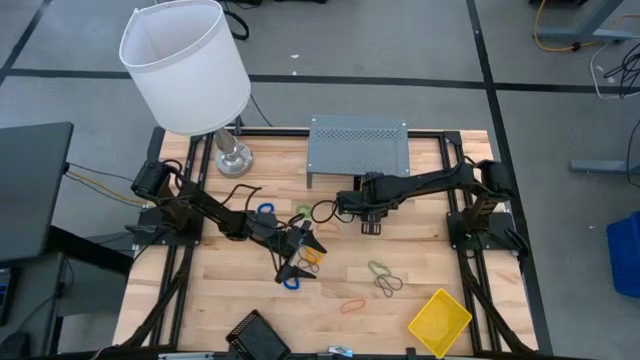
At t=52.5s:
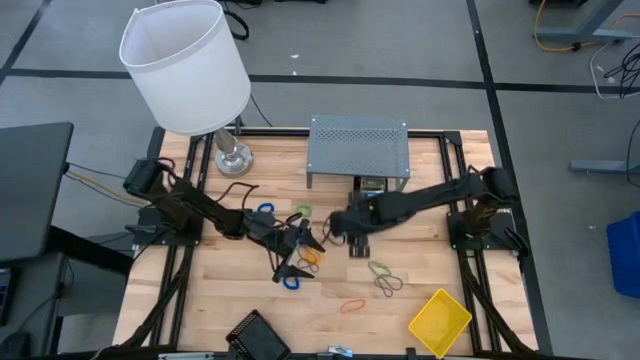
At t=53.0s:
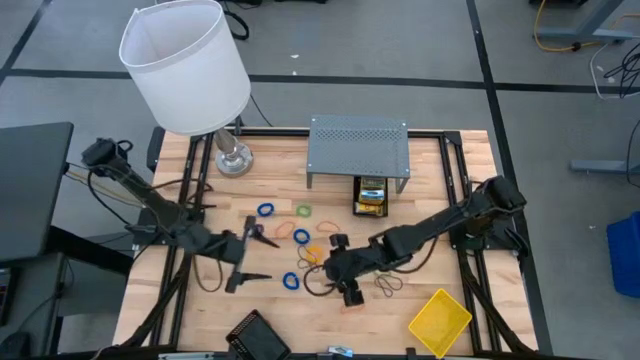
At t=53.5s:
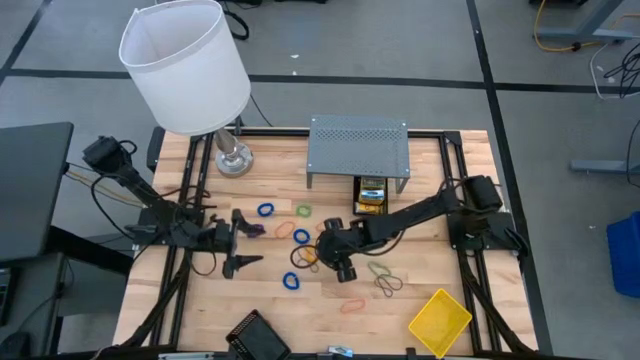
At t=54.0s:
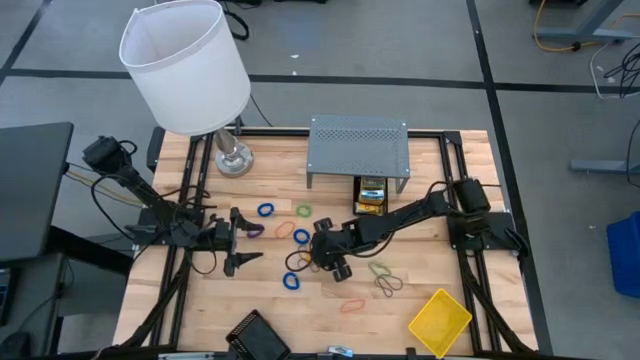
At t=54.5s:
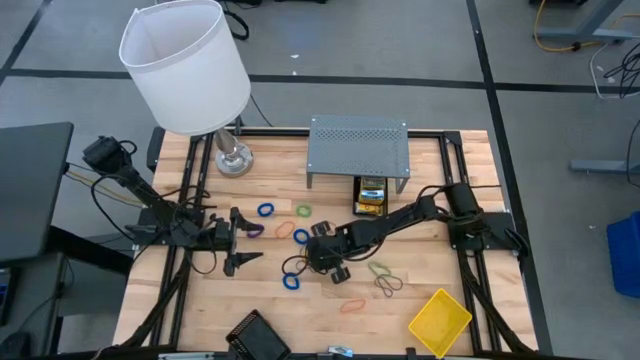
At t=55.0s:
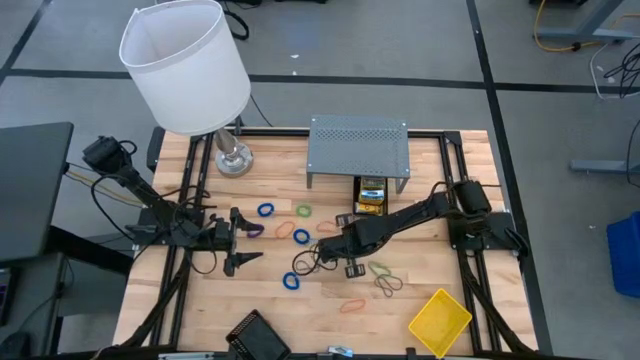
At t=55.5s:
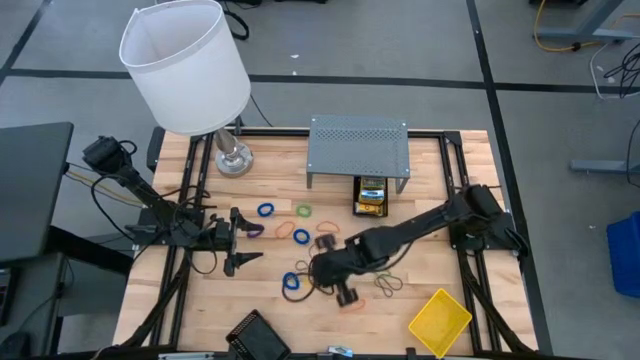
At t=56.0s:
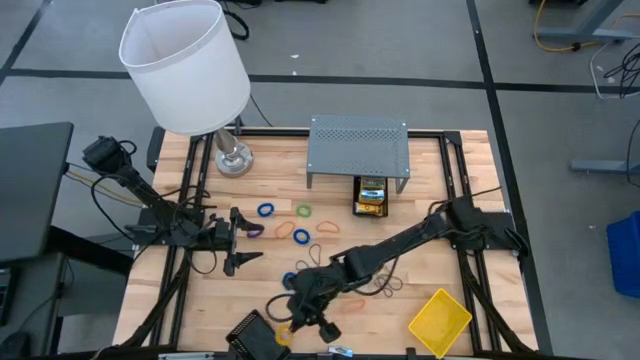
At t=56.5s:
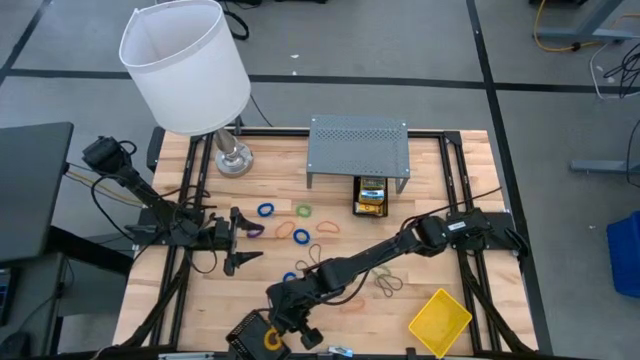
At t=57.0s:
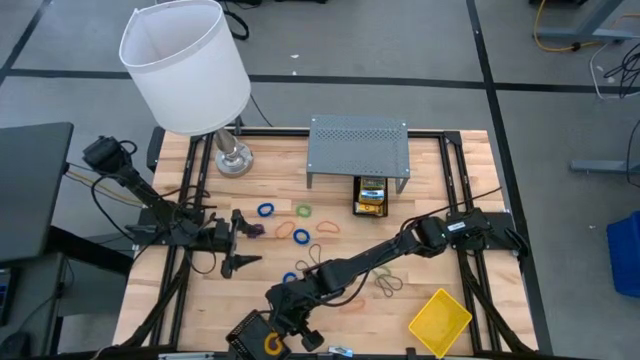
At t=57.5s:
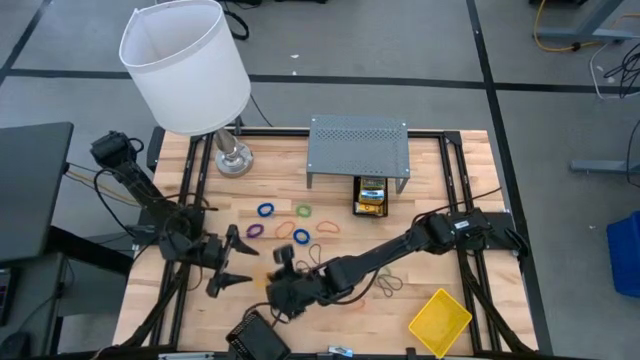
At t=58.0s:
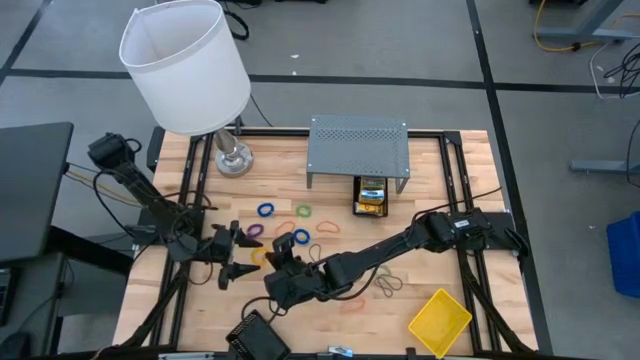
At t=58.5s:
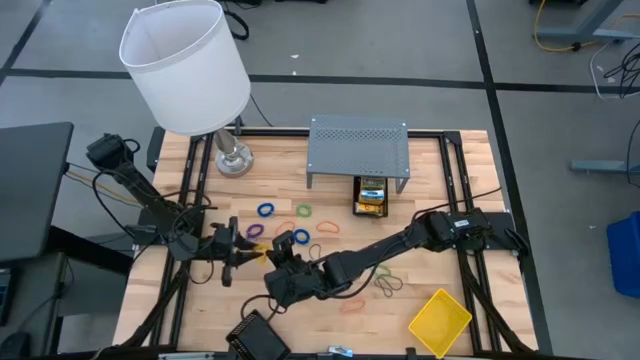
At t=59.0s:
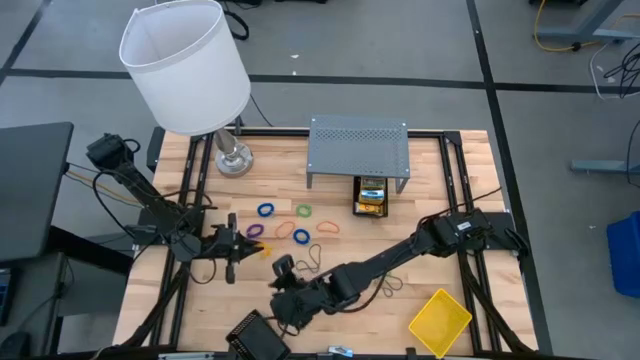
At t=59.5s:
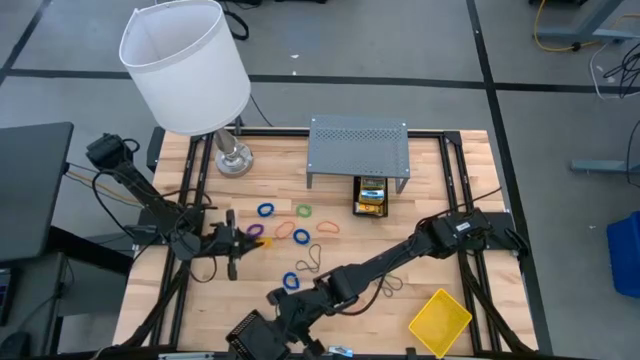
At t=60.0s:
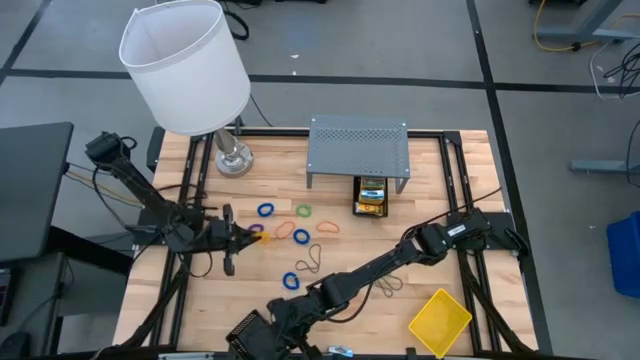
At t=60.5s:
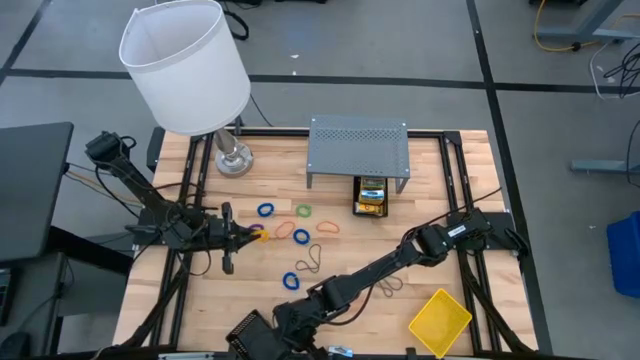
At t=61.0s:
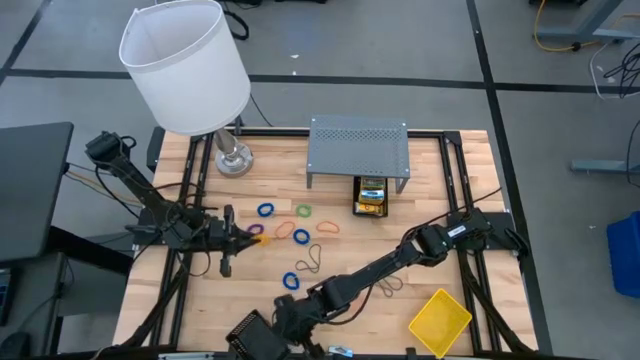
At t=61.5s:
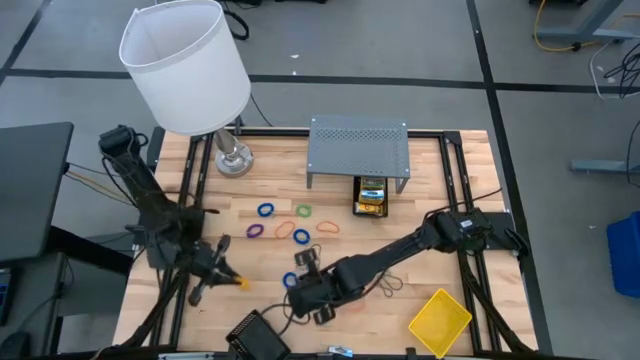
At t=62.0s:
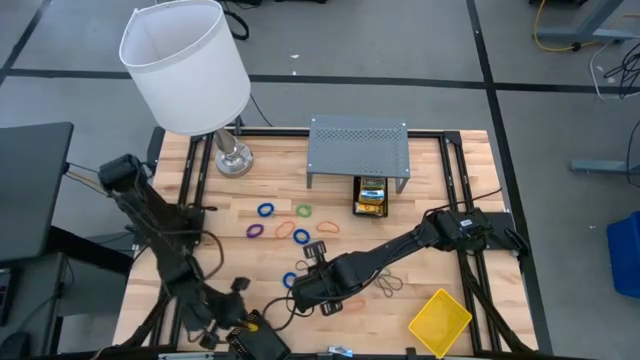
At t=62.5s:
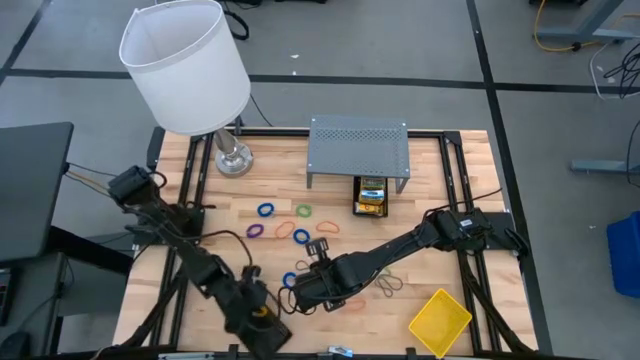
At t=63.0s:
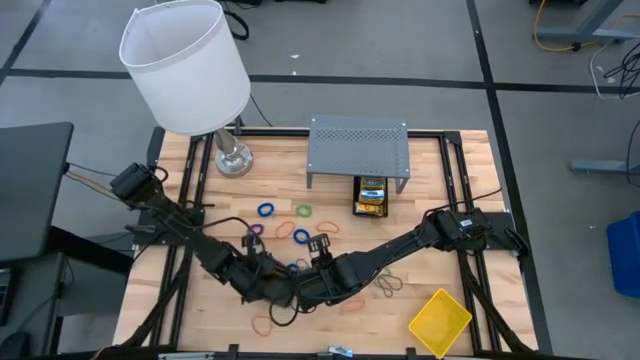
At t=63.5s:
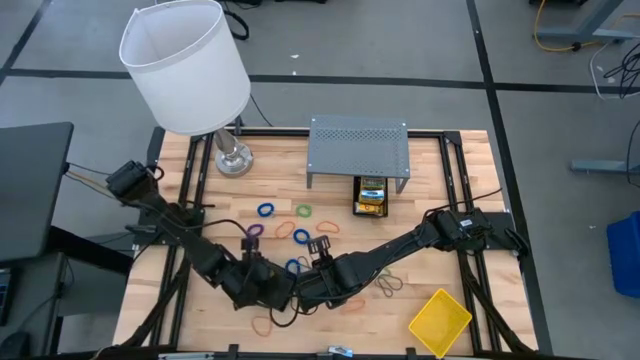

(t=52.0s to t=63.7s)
Task: Pick & Place Office Desk Supplies
Put the yellow spring keychain into the bottom black bin

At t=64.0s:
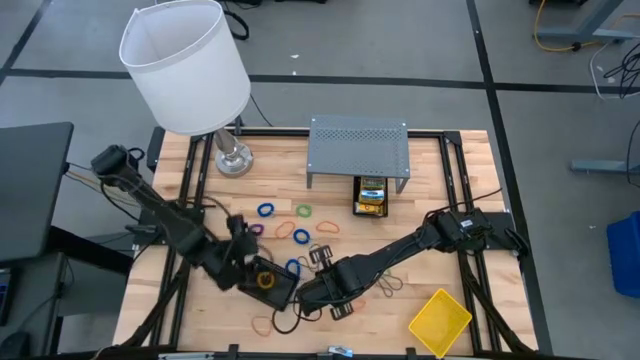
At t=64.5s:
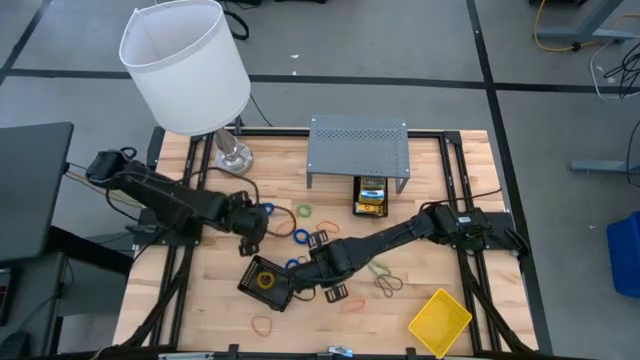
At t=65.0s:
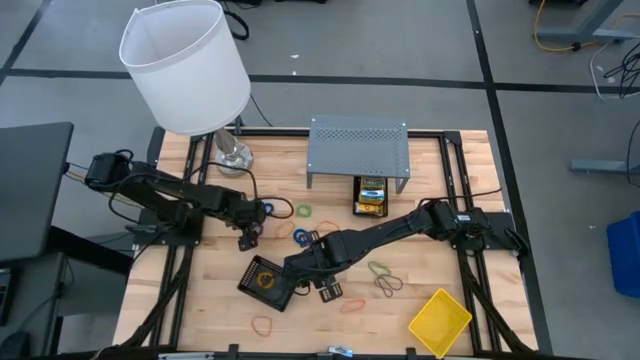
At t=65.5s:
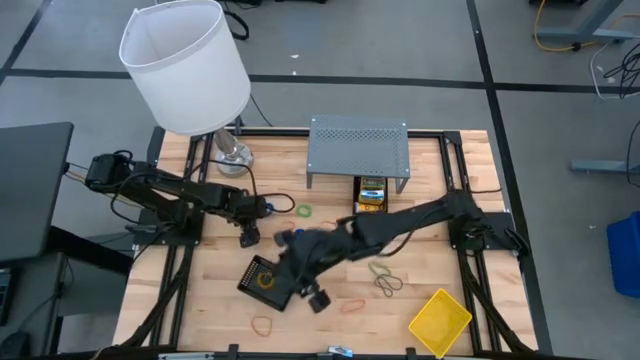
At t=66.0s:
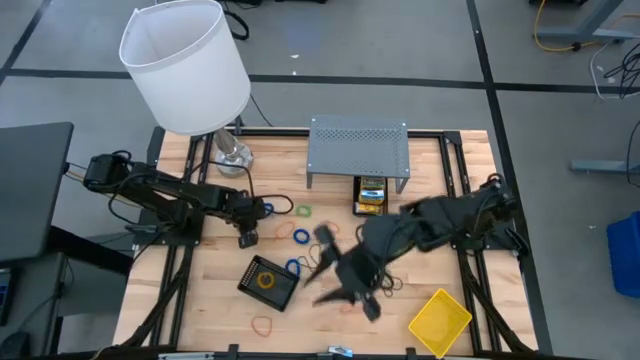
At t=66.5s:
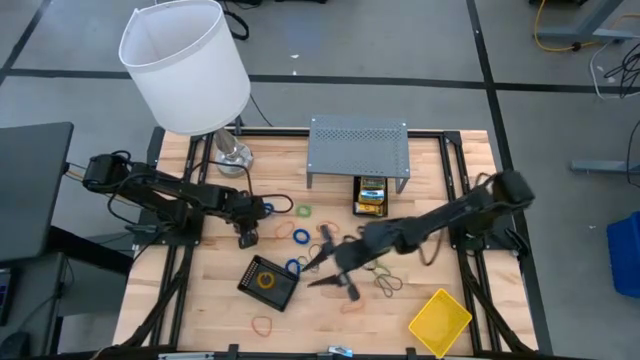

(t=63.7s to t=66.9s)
Put the purple spring keychain into the bottom black bin

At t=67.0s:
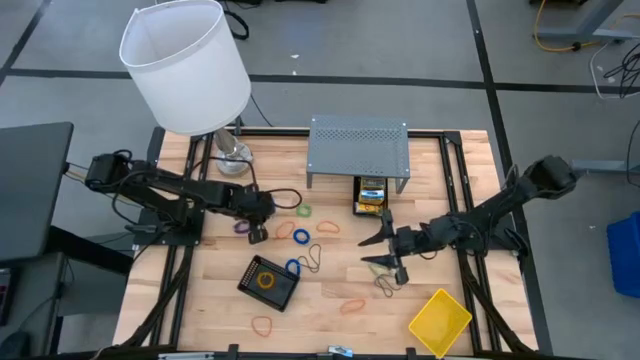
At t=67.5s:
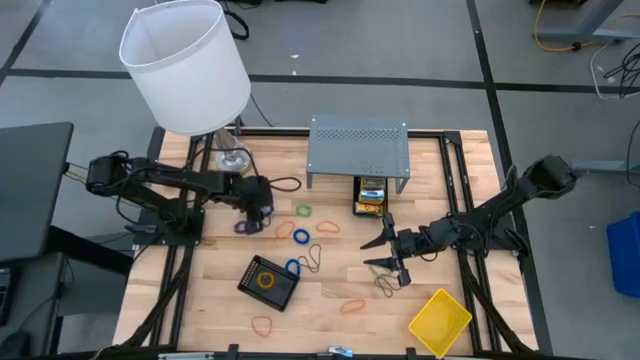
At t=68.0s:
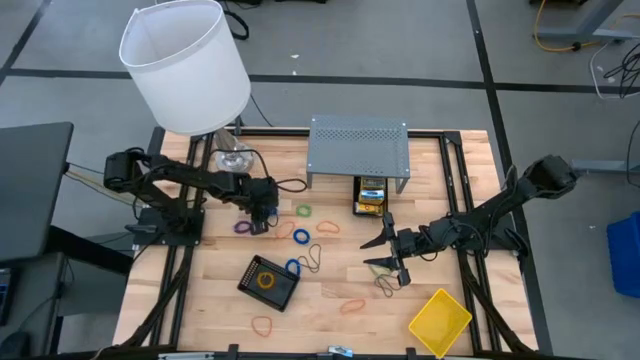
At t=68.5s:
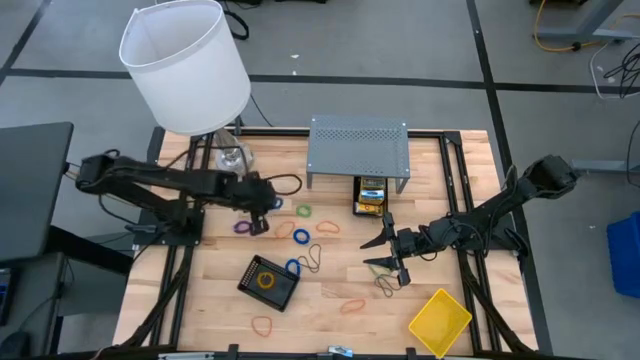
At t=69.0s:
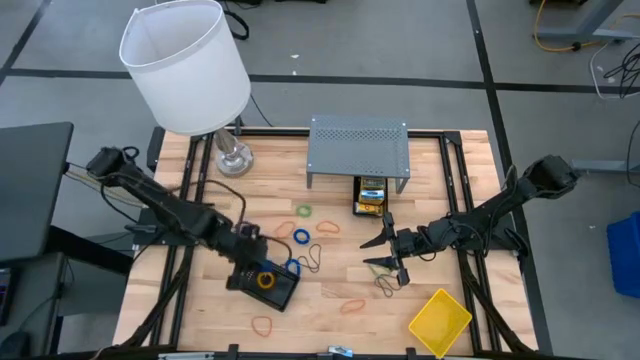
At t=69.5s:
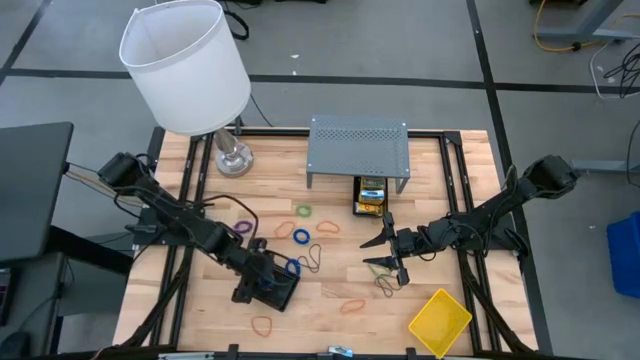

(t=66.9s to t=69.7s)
Put the blue spring keychain into the bottom black bin

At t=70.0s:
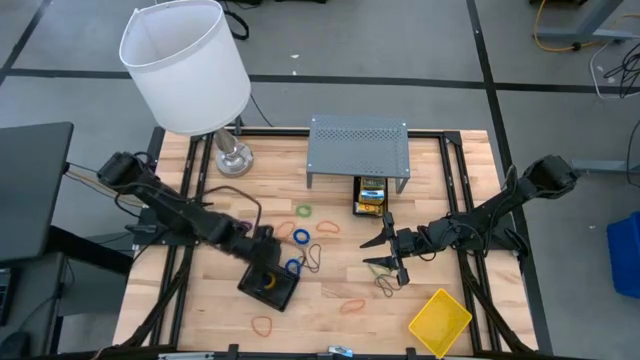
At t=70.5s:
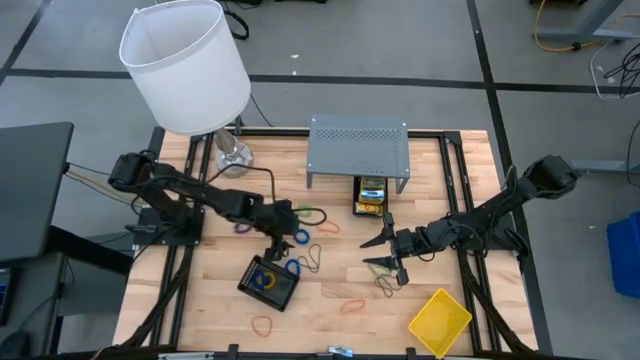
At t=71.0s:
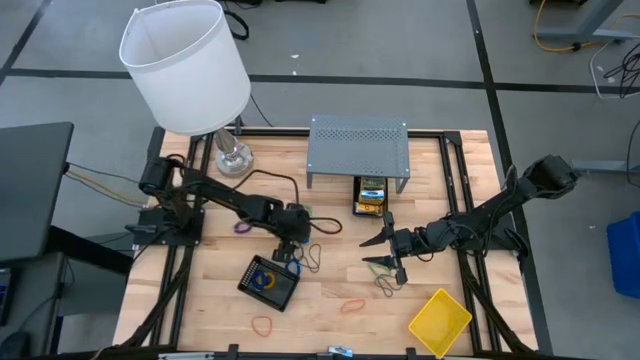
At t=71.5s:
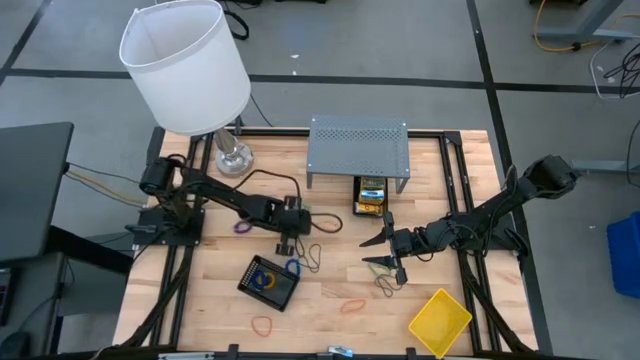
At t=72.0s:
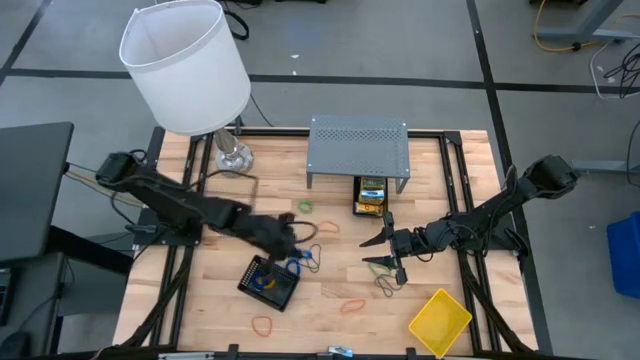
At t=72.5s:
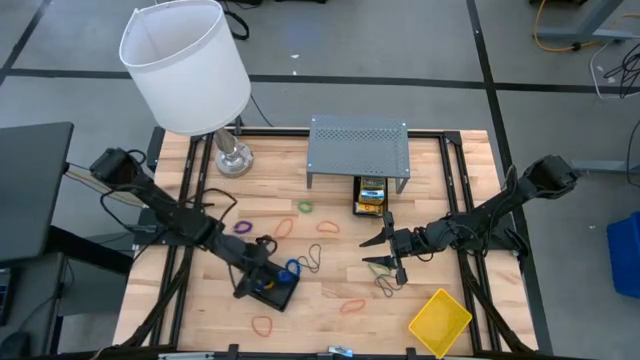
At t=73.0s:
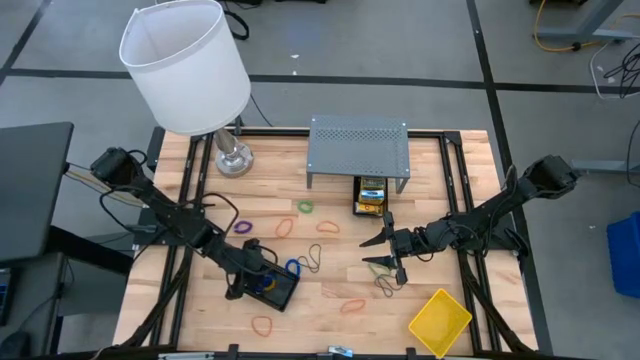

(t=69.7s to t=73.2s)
Put the blue spring keychain into the bottom black bin
